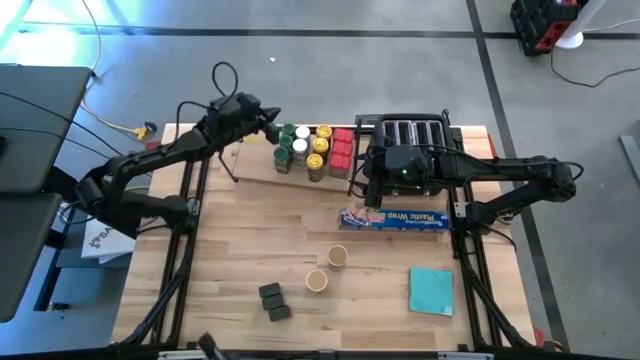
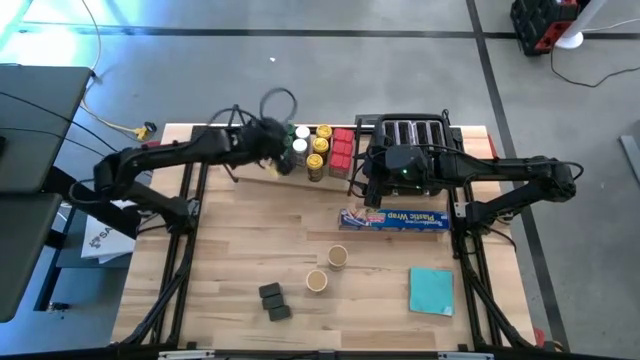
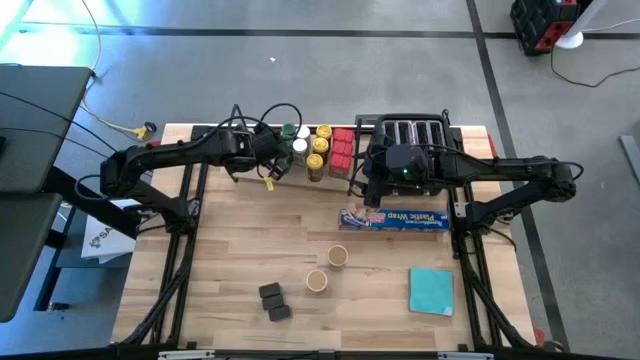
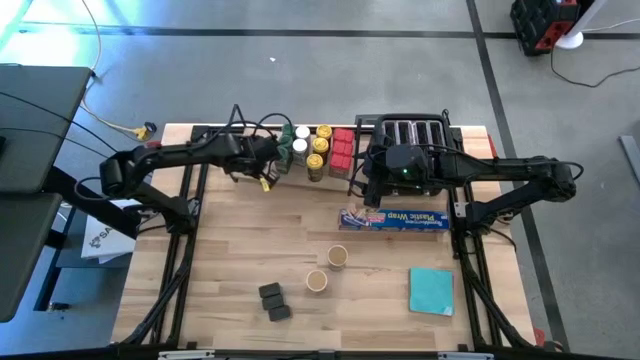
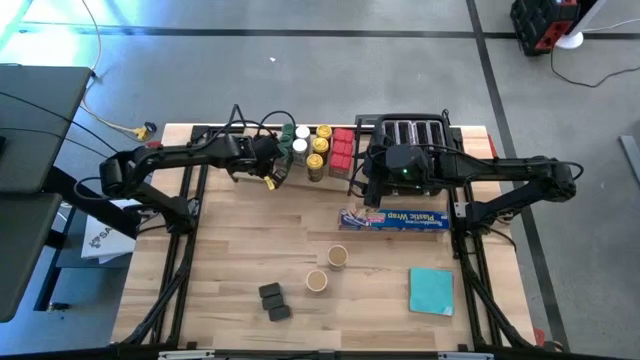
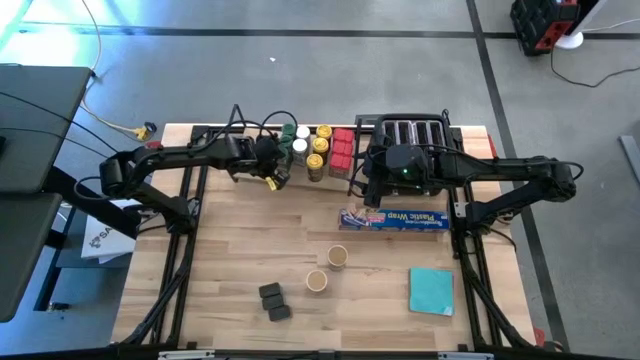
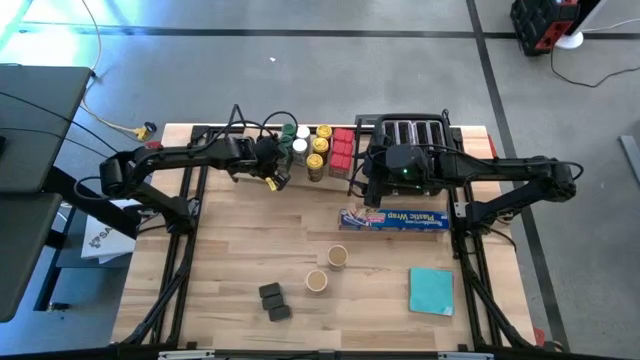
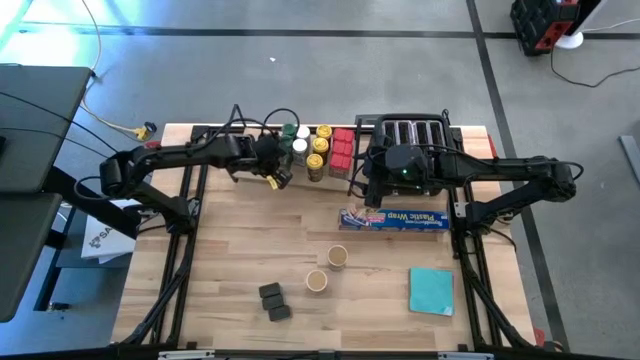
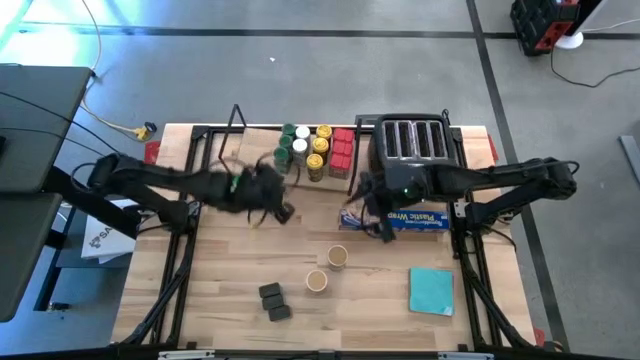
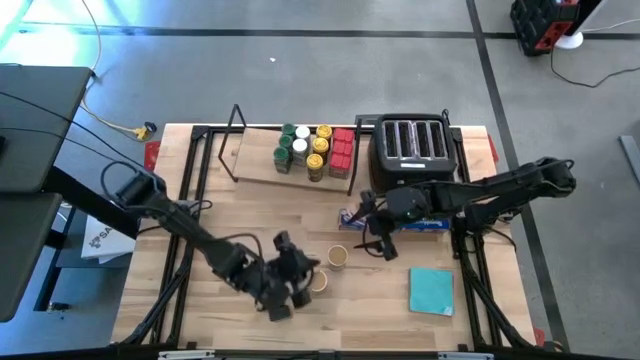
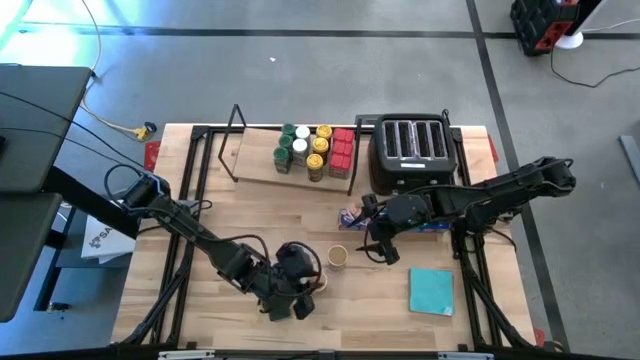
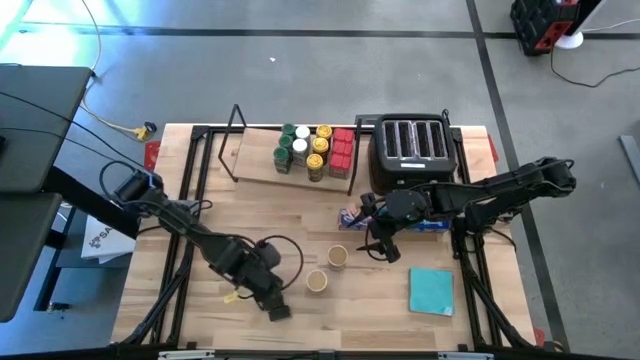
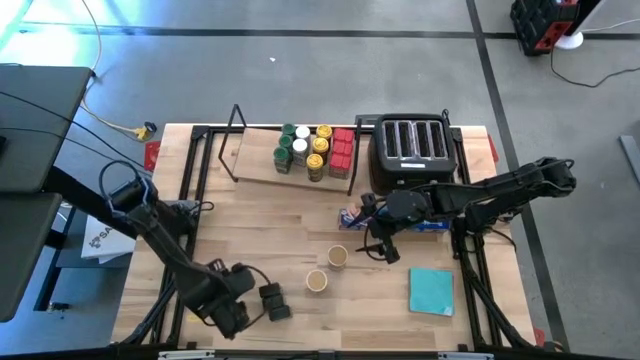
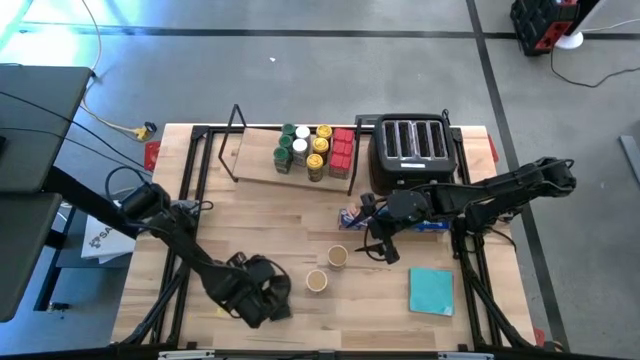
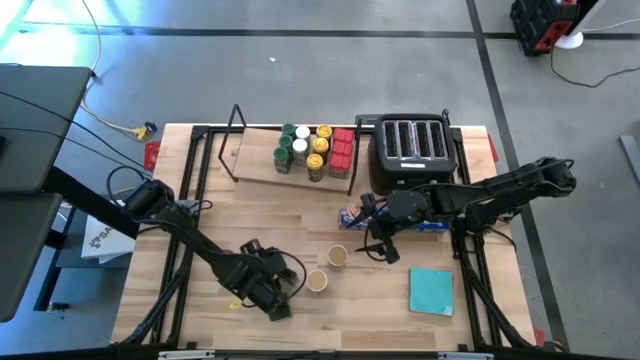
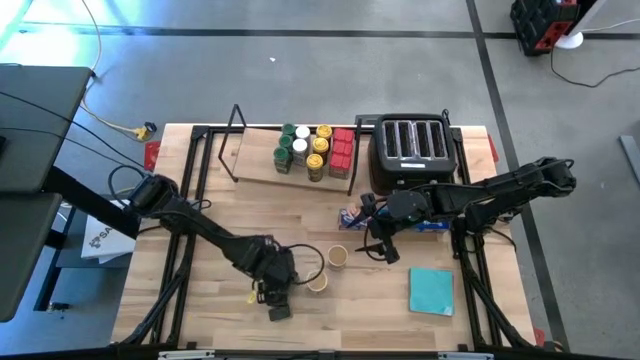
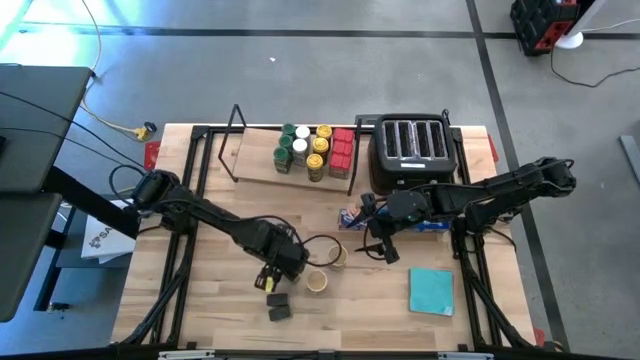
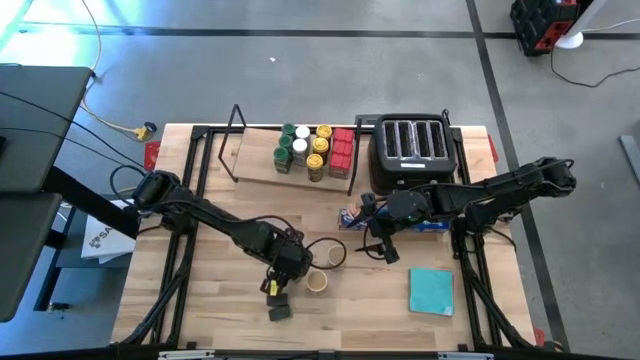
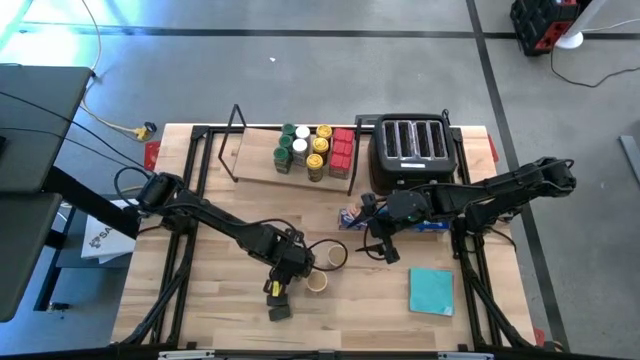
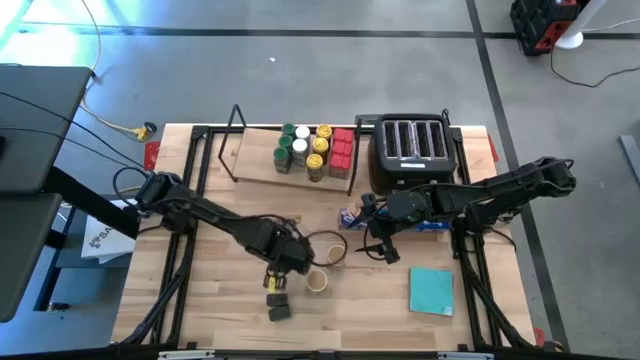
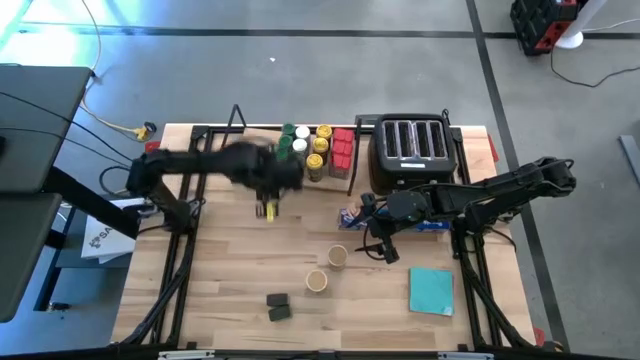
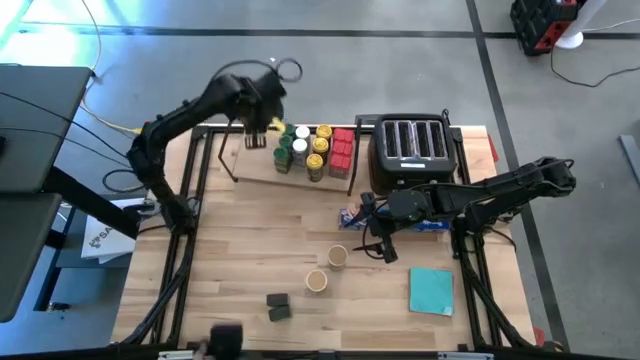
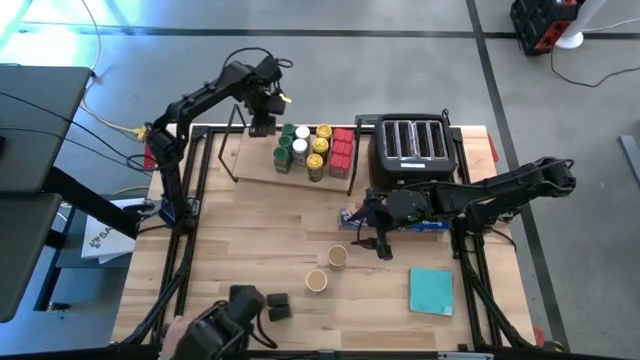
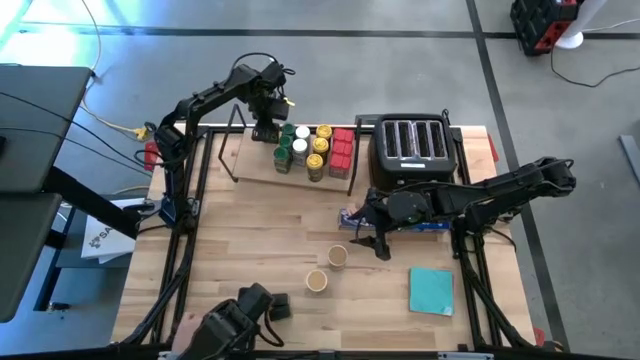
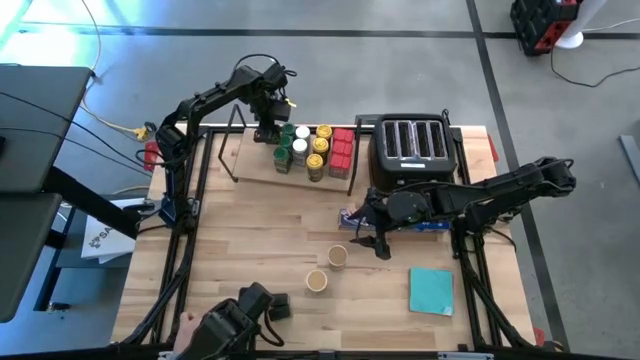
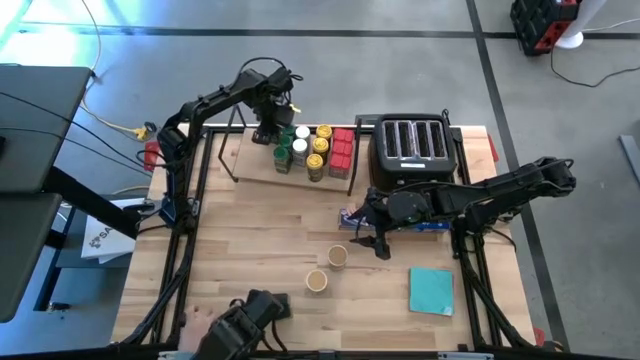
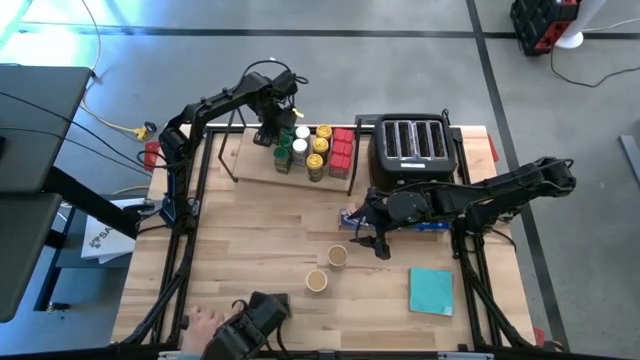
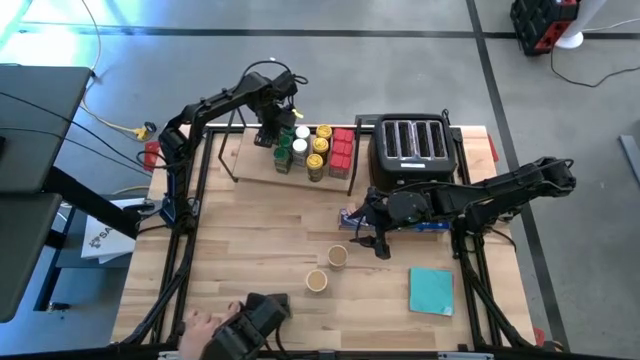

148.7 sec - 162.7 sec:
Task: Shelf spices
Put the top black seasoning can on the shelf

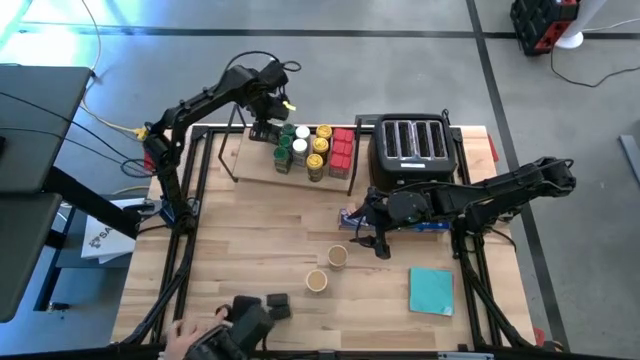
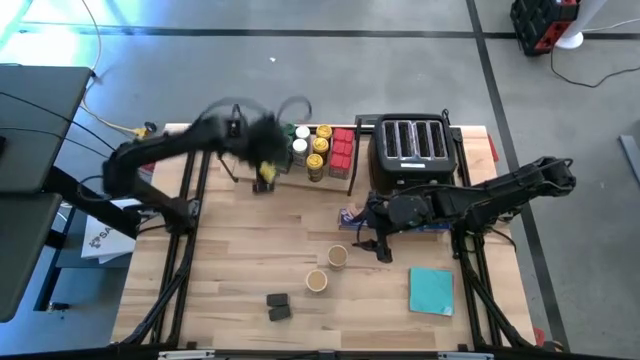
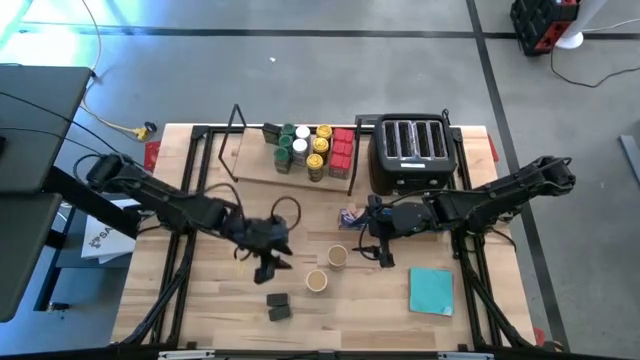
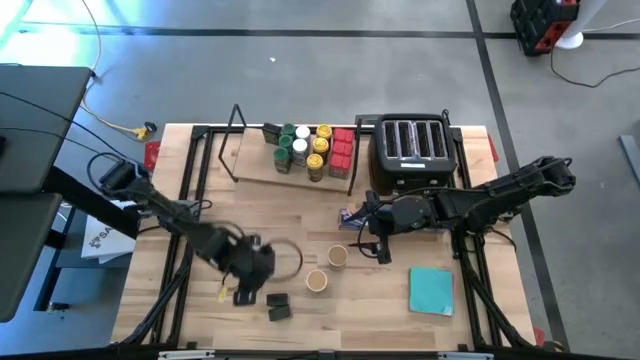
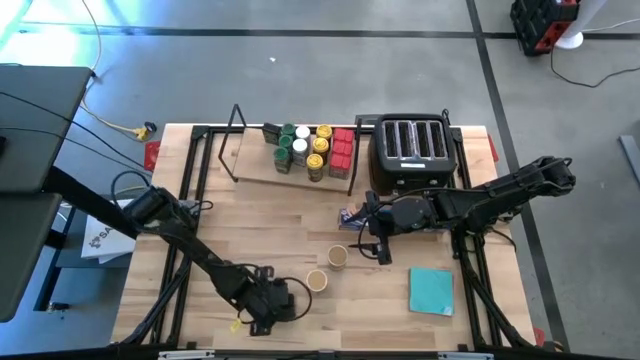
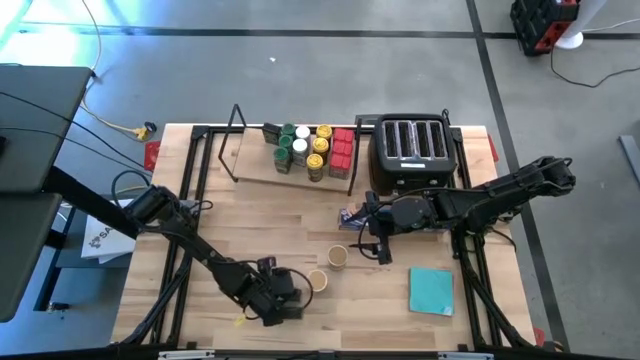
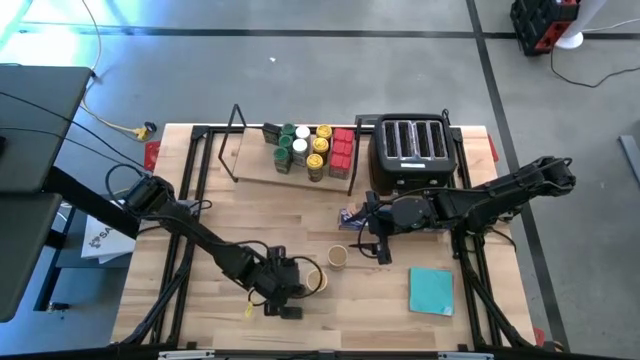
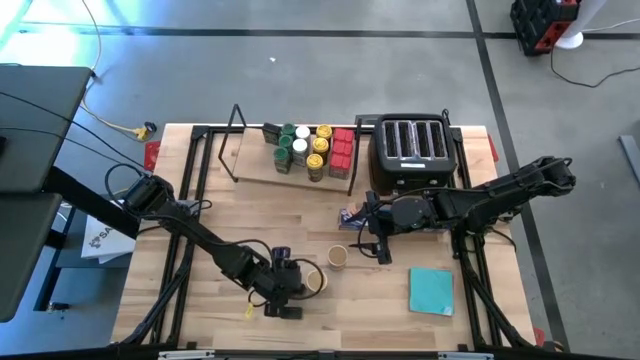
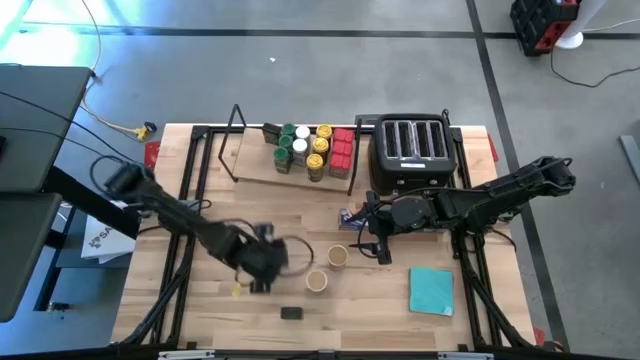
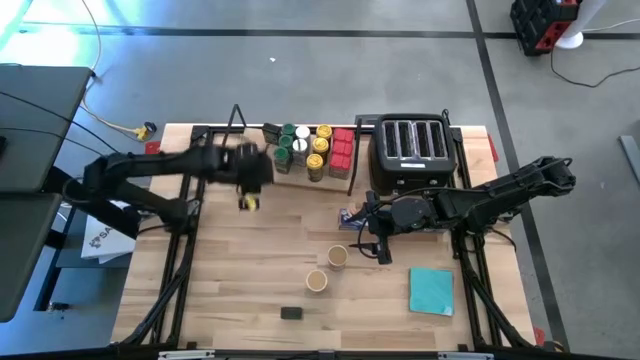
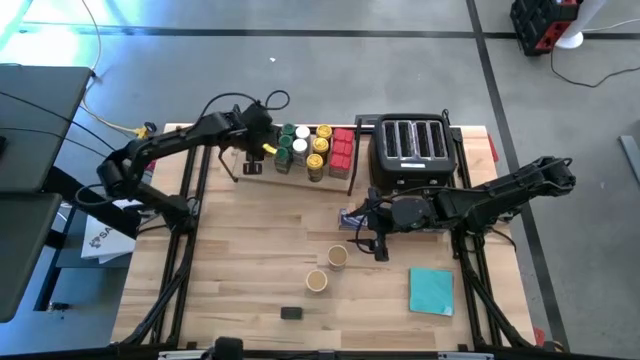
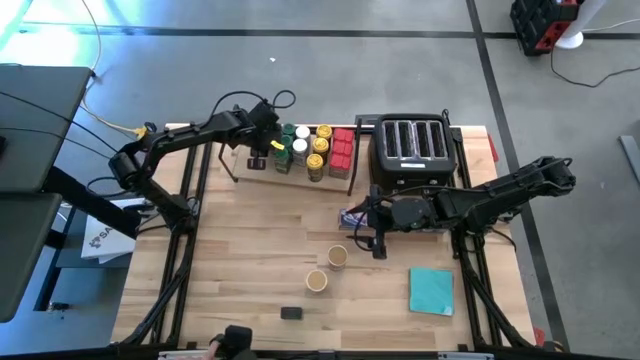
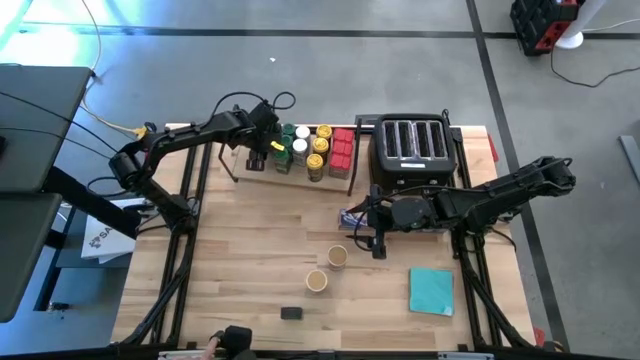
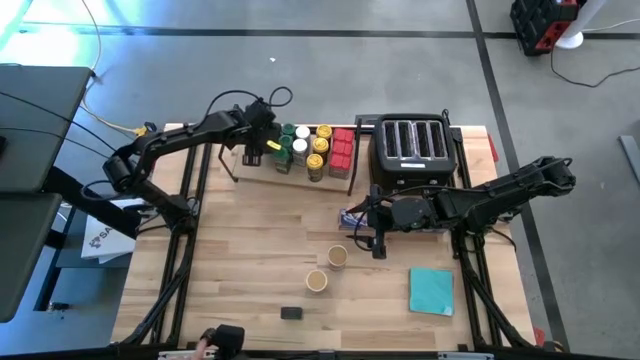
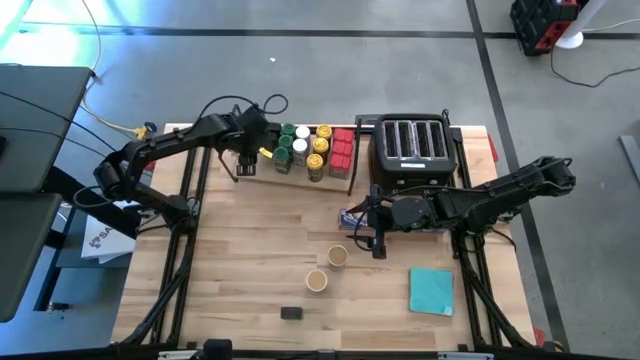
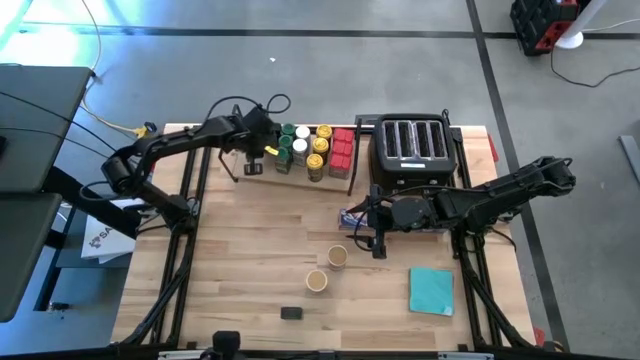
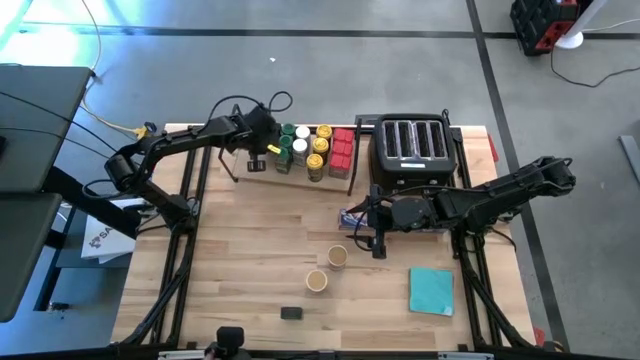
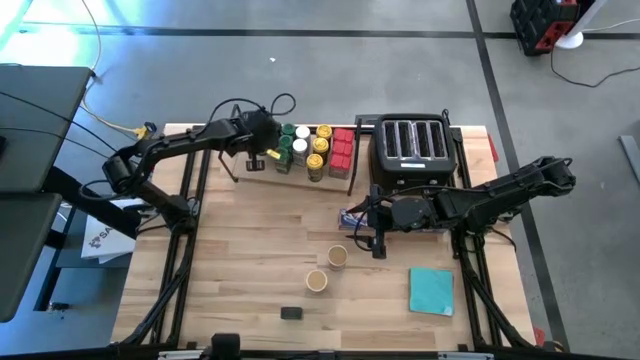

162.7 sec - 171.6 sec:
Put the top black seasoning can on the shelf aligned with the other black seasoning cans
